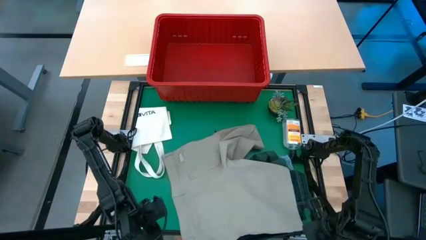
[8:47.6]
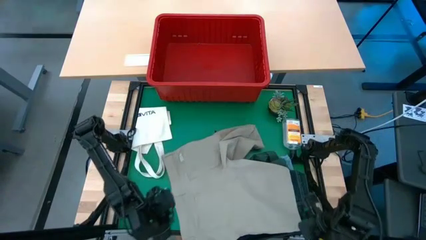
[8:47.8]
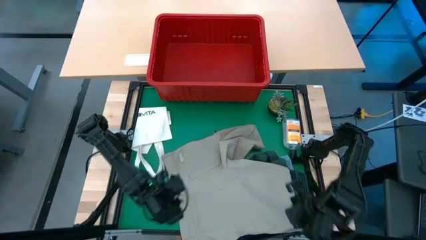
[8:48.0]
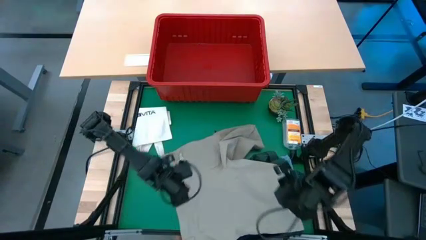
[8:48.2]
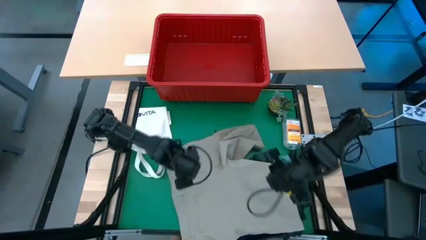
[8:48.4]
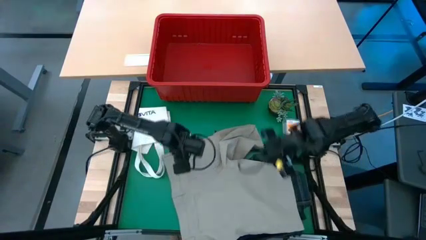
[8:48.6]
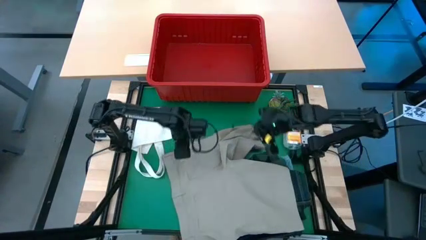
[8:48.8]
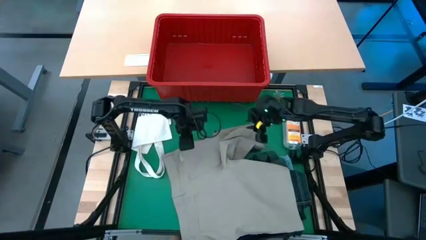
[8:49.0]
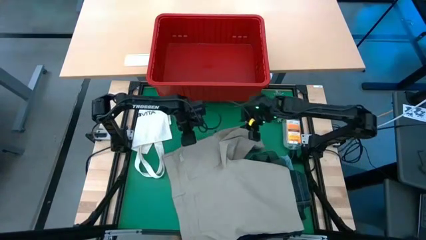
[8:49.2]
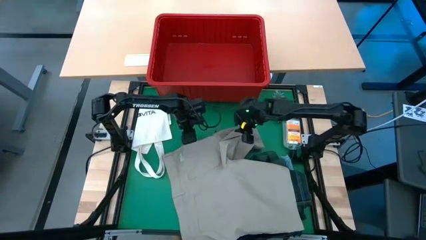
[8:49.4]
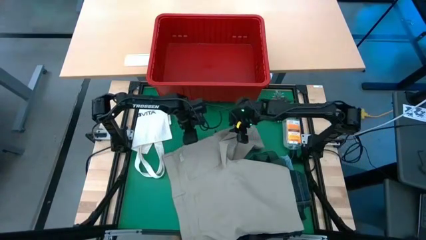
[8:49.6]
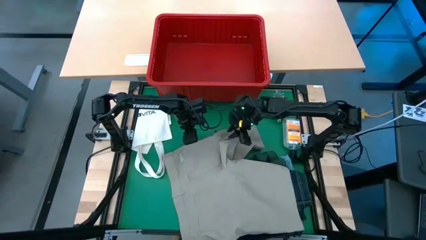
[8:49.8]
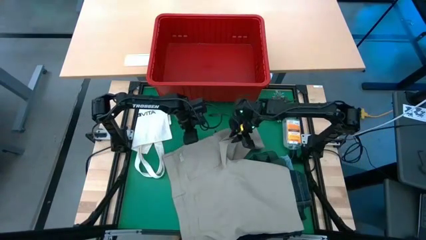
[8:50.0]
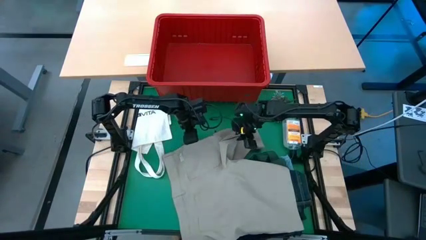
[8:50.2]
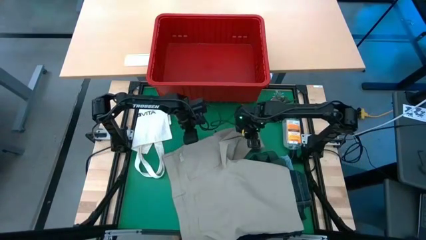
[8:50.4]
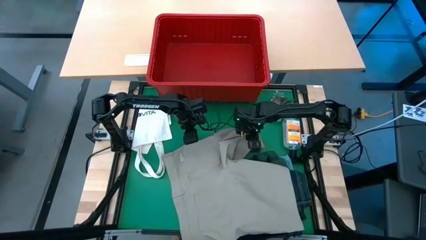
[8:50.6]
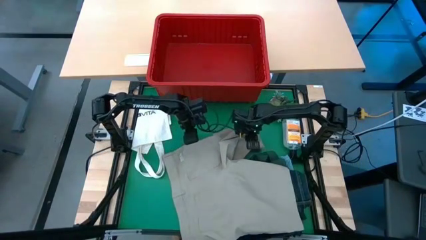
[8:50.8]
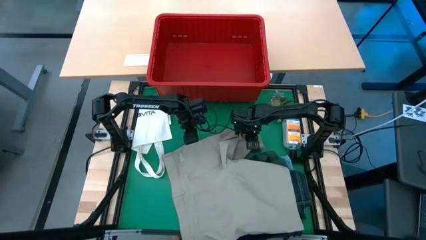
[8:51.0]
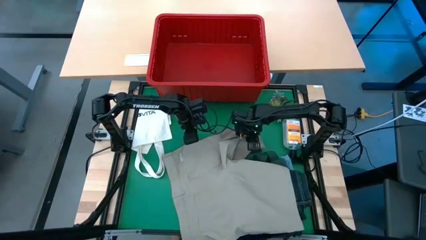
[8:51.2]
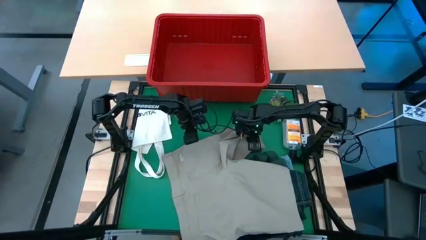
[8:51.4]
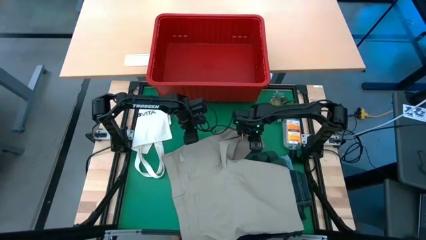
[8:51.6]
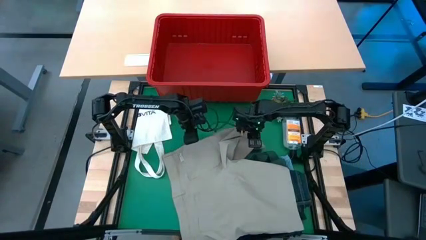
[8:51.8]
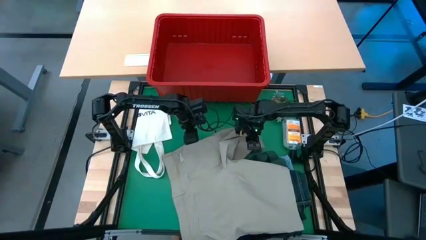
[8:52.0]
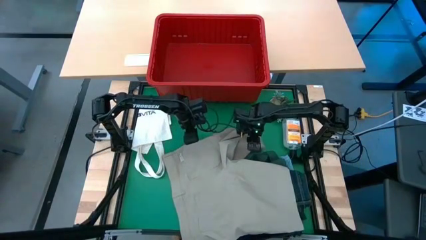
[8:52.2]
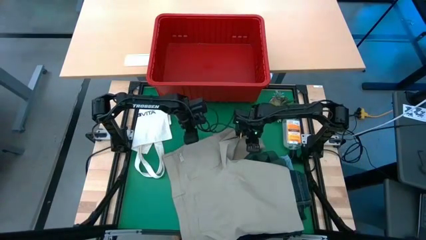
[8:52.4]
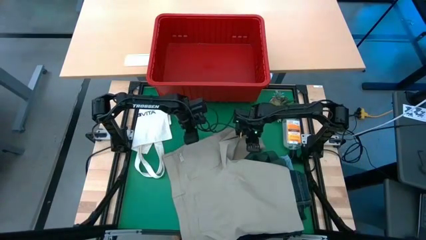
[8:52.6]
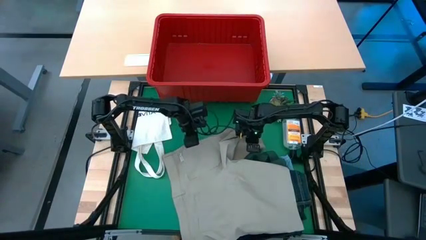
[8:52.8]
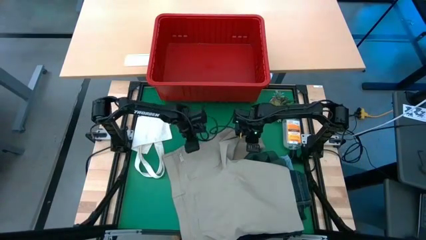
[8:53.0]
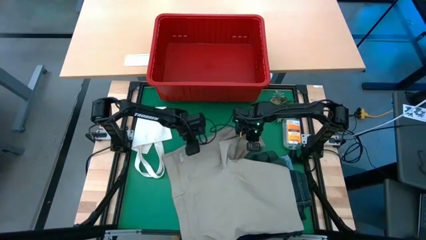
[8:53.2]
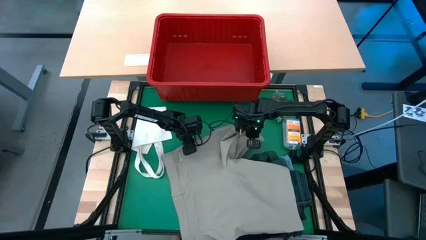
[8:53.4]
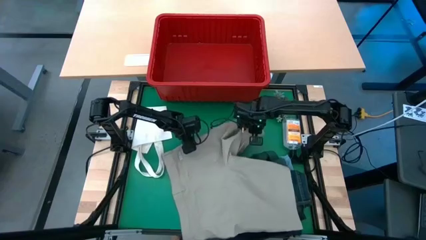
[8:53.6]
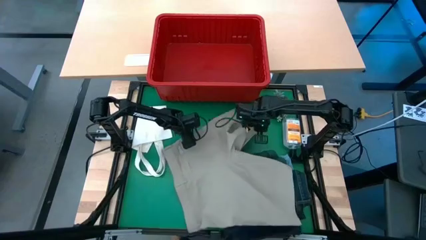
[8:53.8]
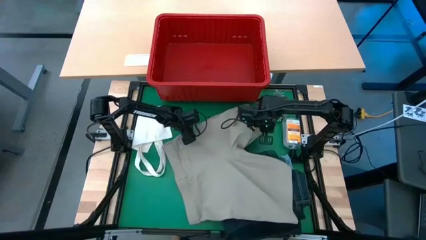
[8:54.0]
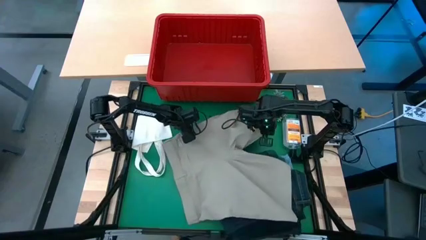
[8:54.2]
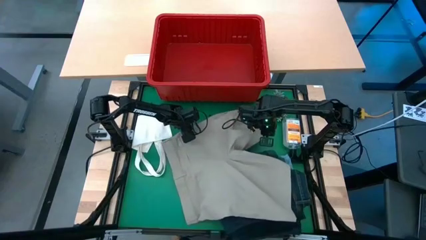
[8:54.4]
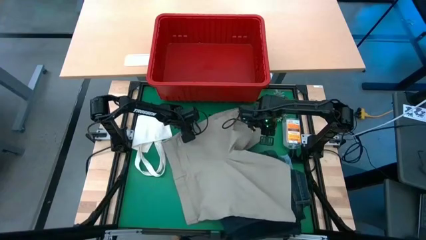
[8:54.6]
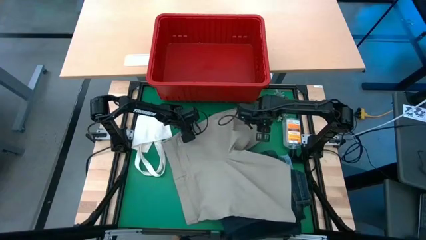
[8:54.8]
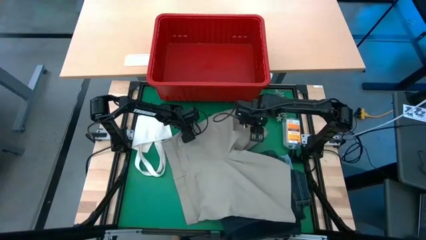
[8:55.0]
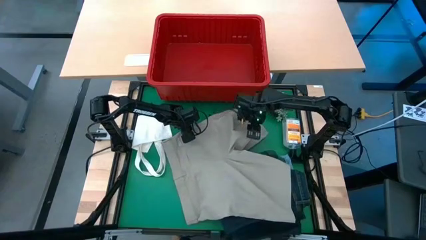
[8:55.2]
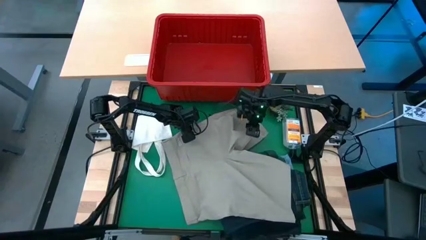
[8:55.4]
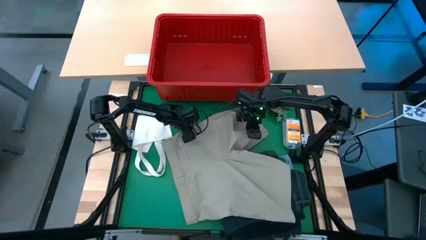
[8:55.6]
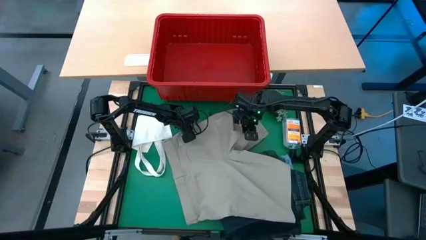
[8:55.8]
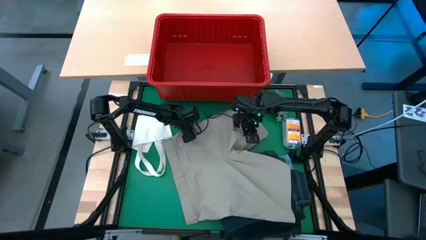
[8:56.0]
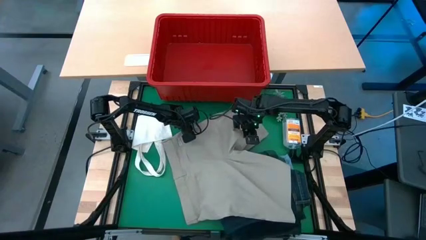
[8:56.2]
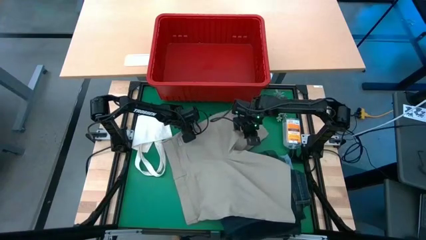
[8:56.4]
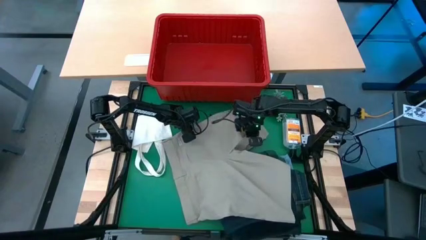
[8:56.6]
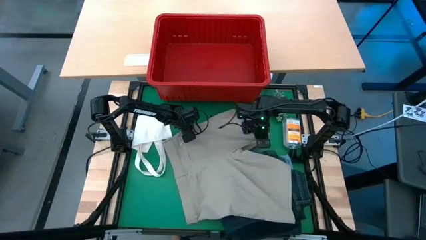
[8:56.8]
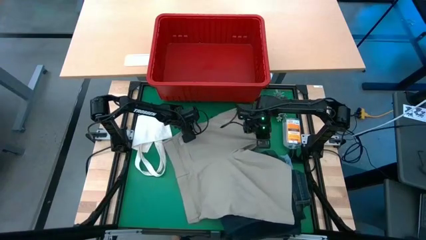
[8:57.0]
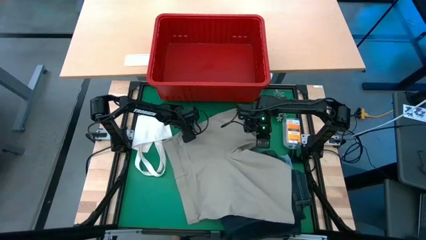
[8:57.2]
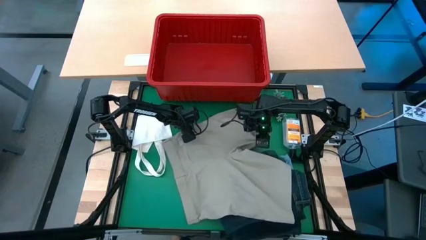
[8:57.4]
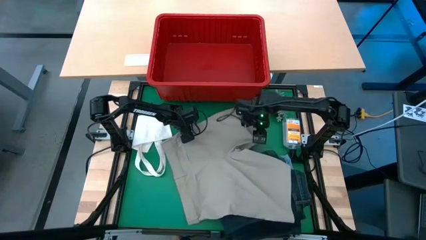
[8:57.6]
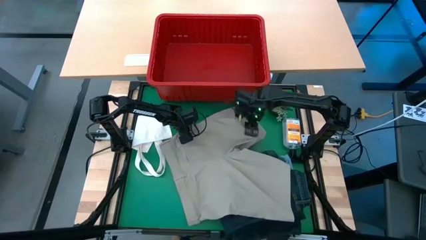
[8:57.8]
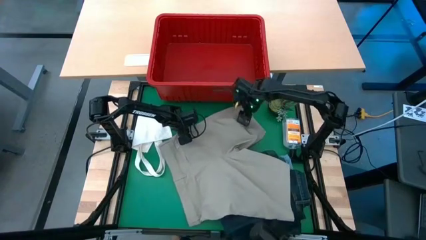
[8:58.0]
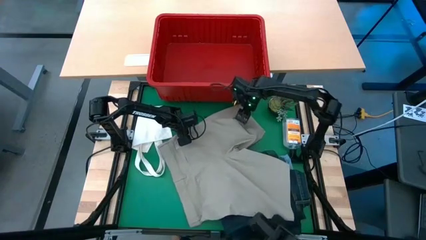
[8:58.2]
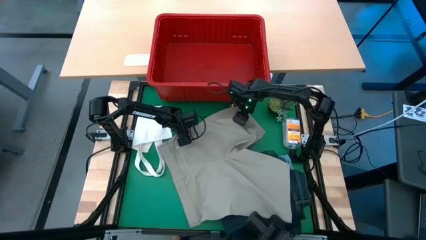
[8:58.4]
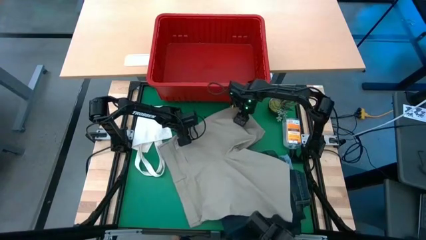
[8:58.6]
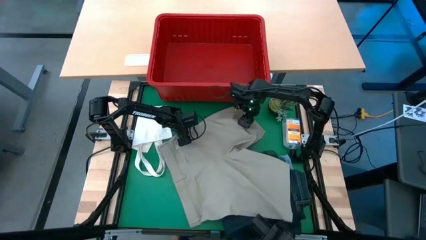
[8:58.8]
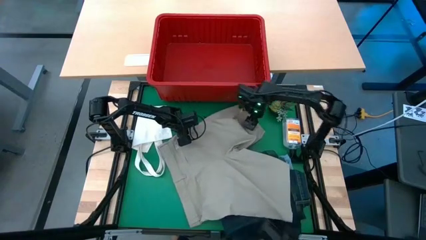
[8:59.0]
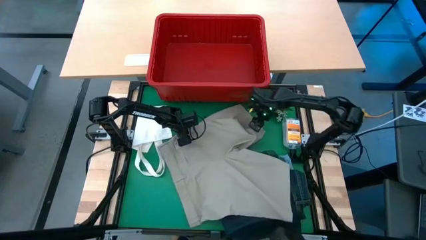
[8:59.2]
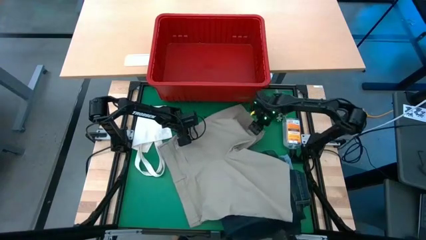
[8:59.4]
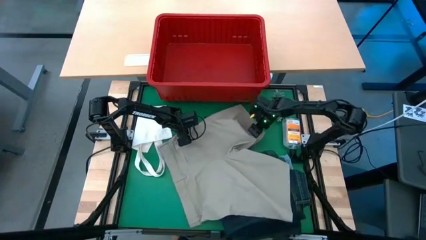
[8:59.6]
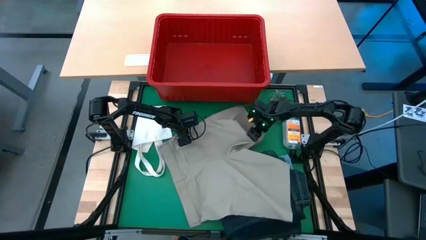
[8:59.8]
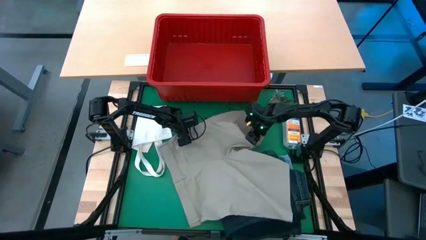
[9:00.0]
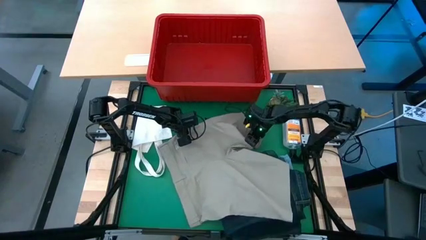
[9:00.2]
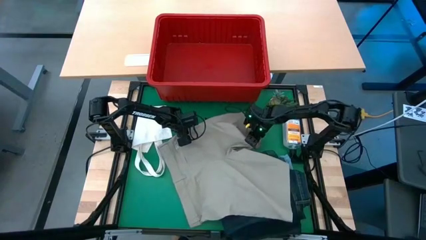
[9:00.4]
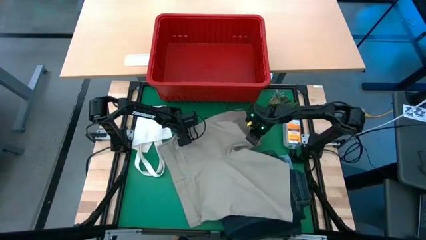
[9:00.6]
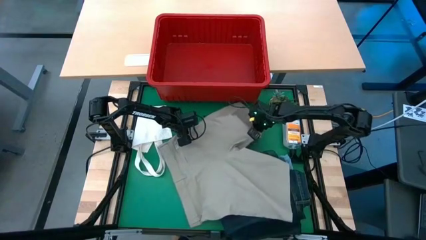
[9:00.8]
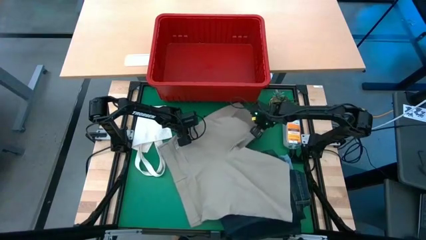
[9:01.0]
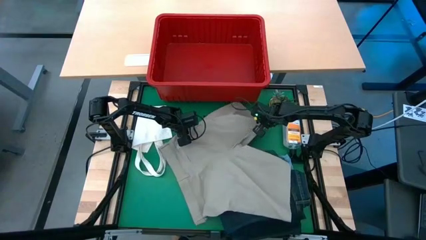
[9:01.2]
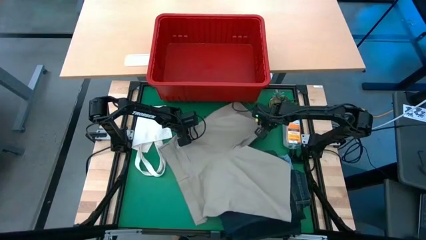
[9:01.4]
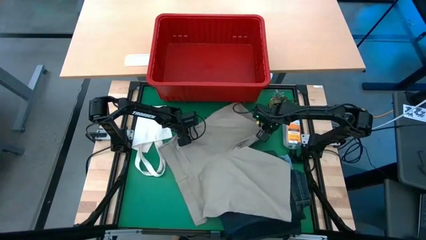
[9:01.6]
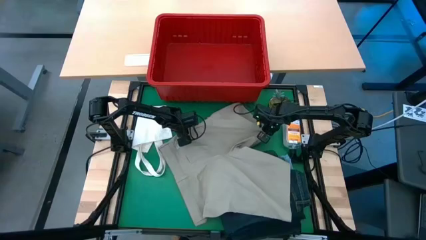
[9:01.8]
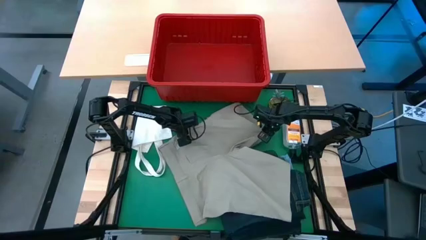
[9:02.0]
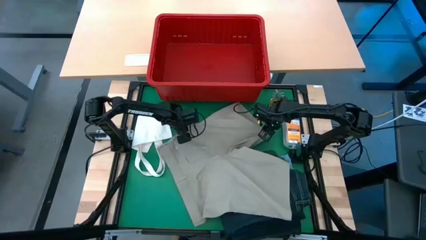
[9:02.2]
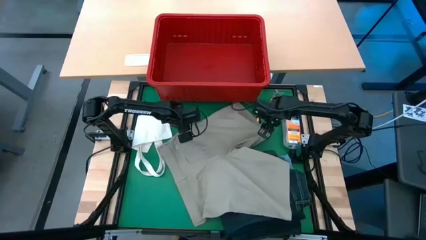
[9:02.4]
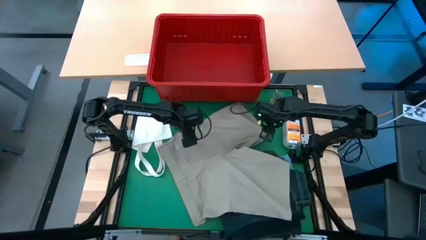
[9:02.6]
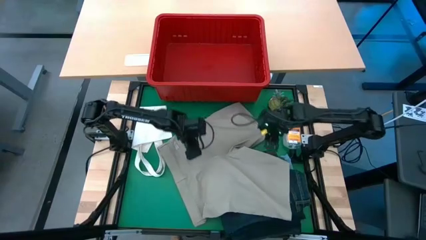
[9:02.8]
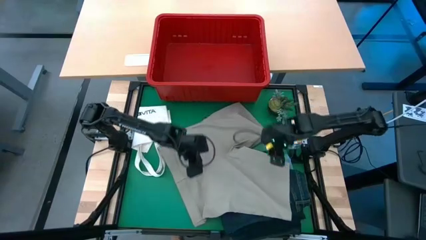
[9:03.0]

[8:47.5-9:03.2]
Task: Fold Laundry from Bin
Fold the brown shorts
